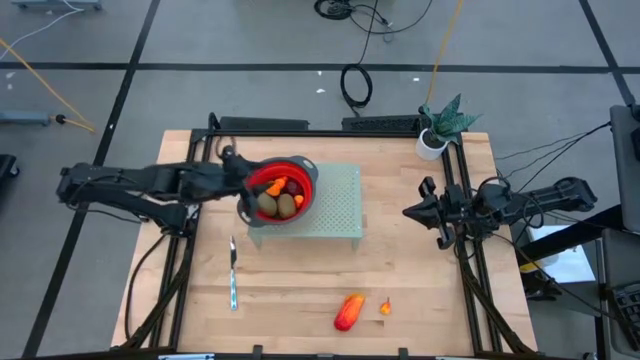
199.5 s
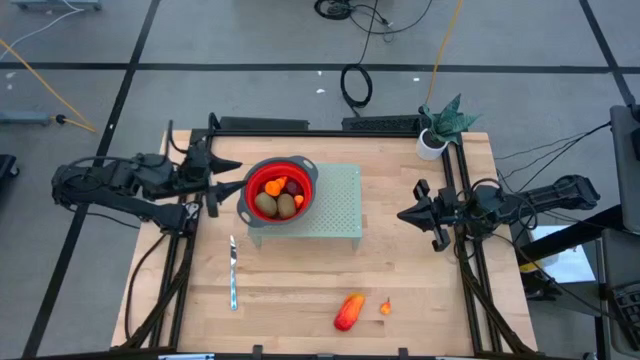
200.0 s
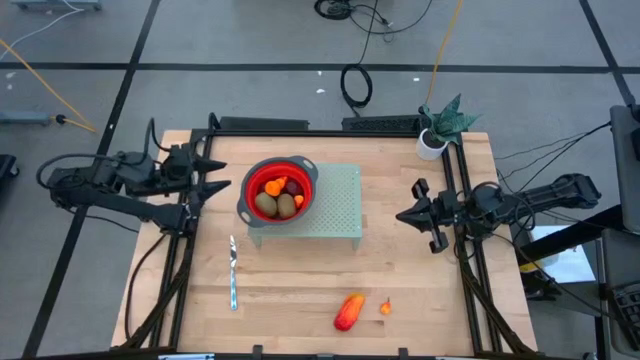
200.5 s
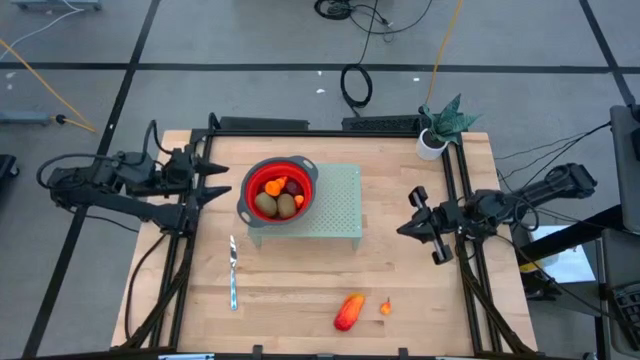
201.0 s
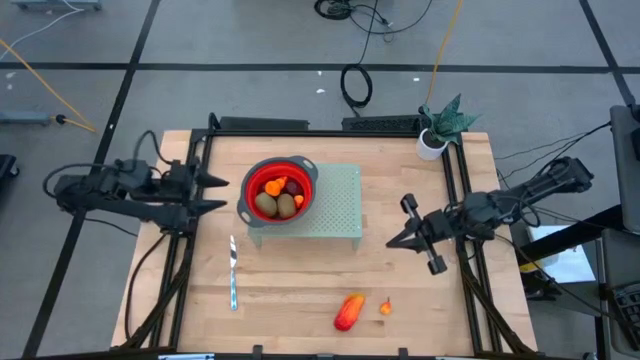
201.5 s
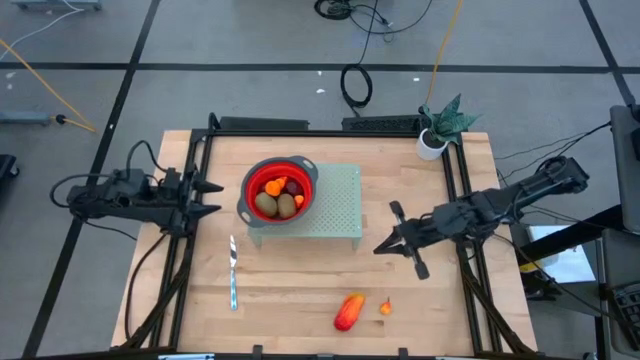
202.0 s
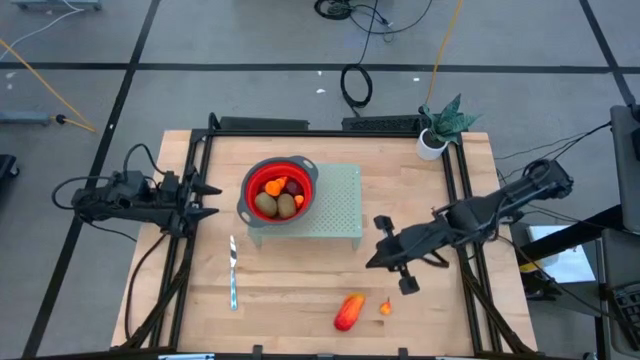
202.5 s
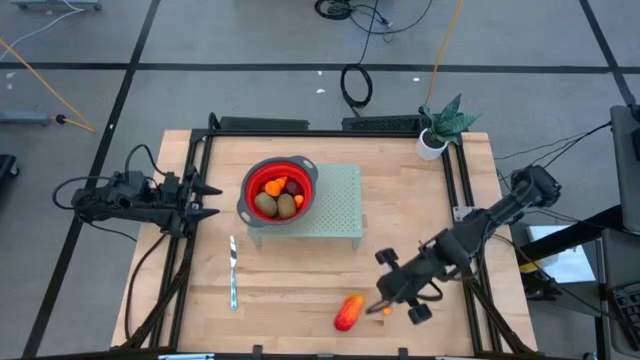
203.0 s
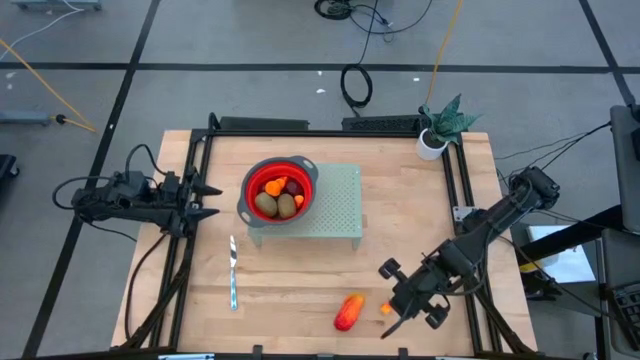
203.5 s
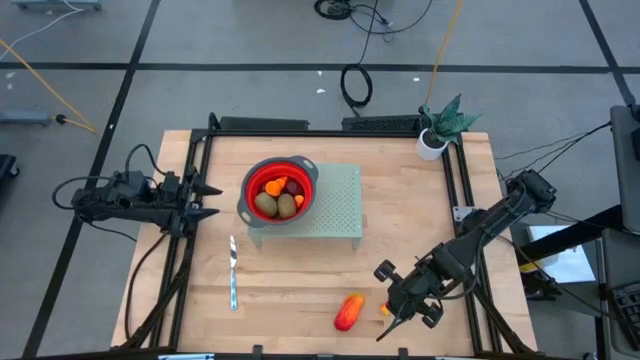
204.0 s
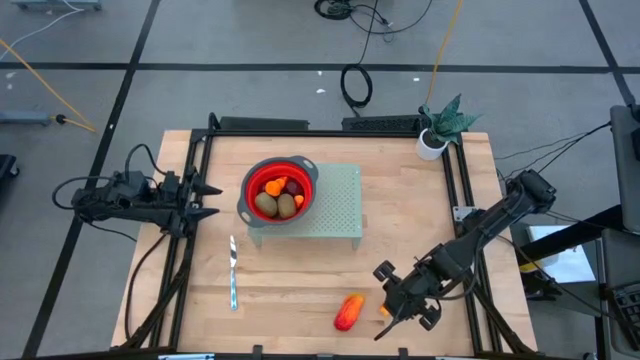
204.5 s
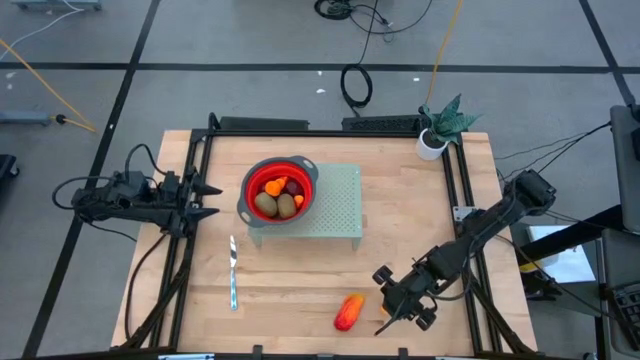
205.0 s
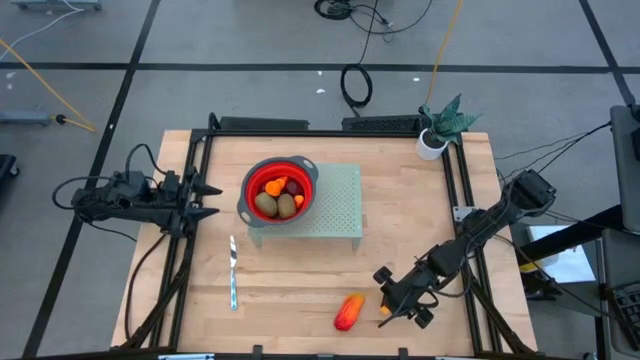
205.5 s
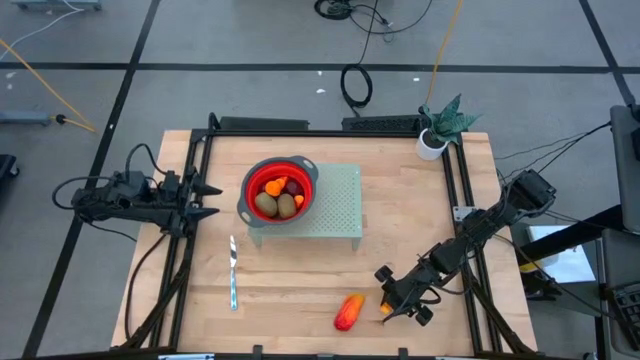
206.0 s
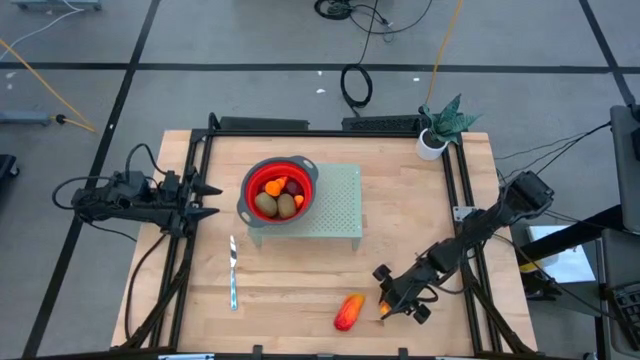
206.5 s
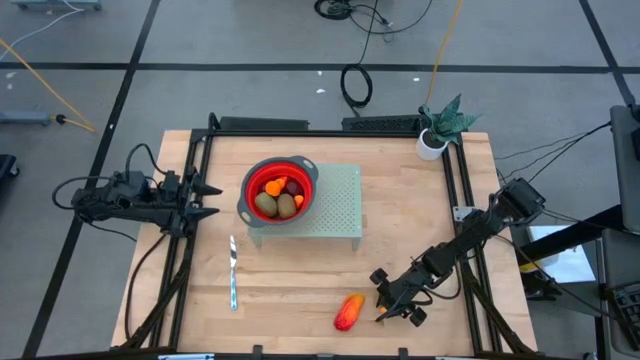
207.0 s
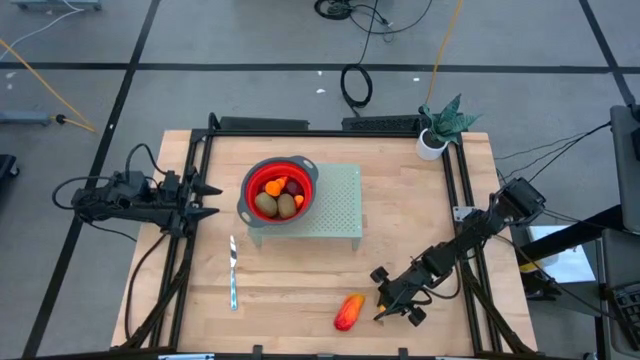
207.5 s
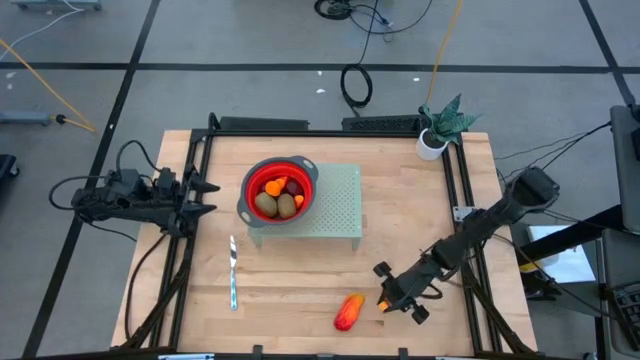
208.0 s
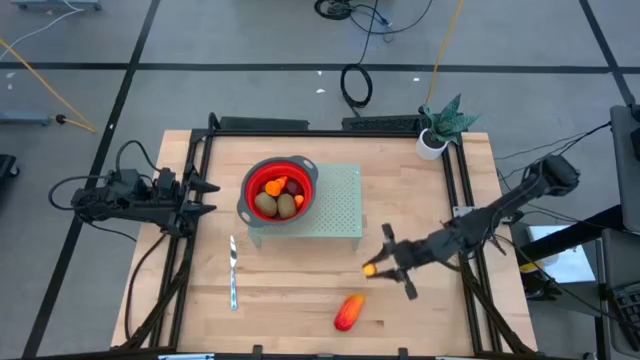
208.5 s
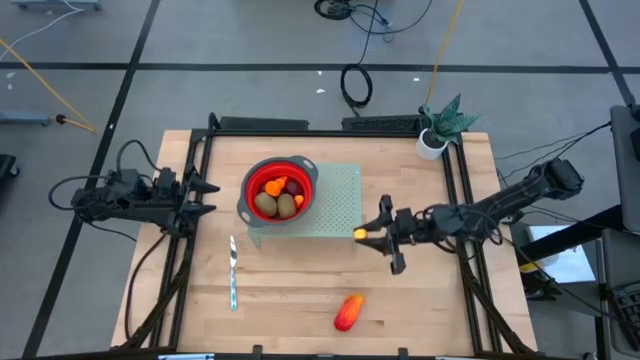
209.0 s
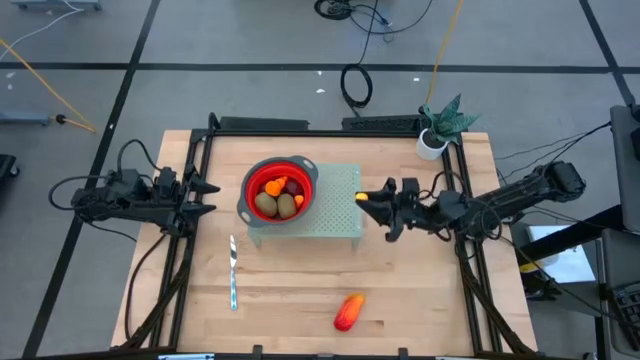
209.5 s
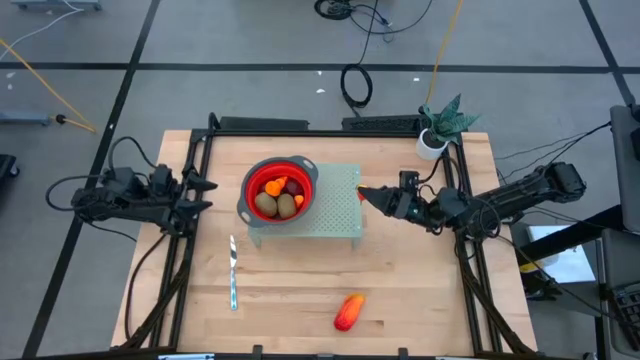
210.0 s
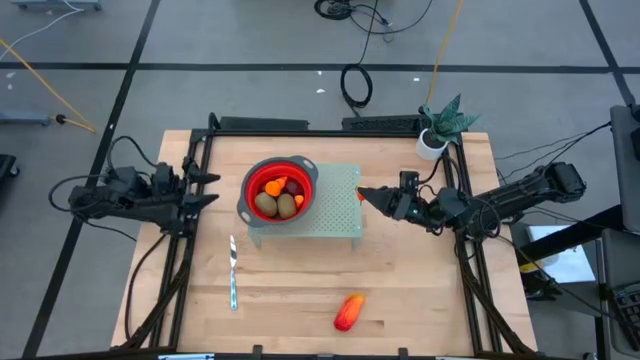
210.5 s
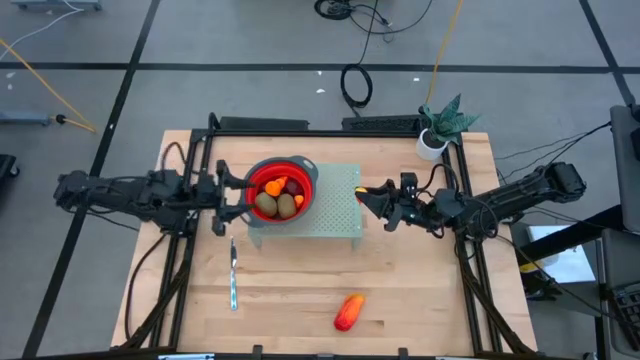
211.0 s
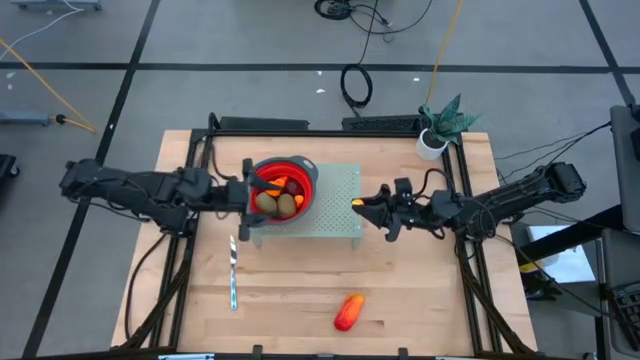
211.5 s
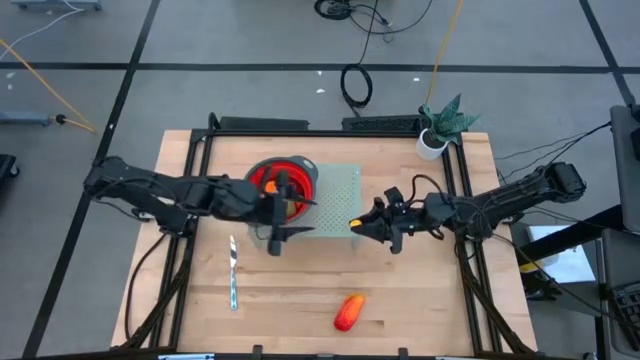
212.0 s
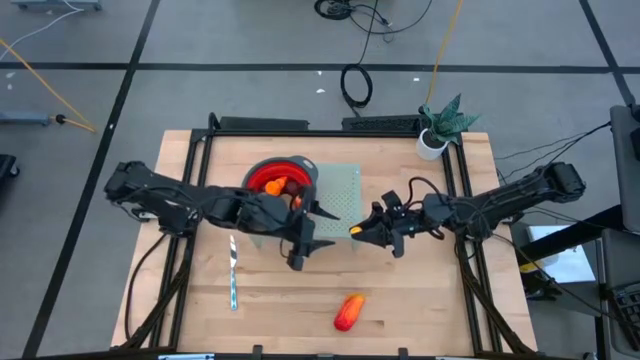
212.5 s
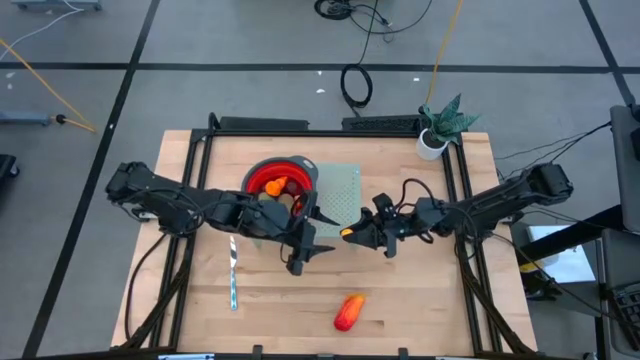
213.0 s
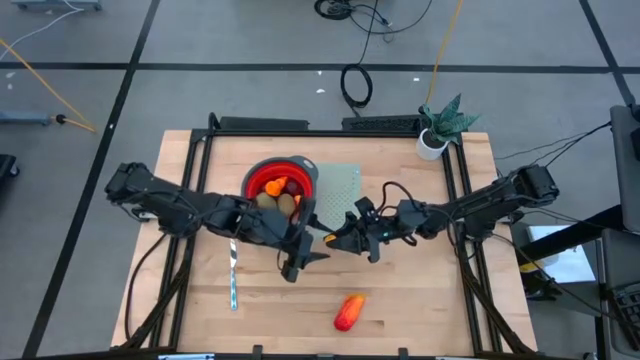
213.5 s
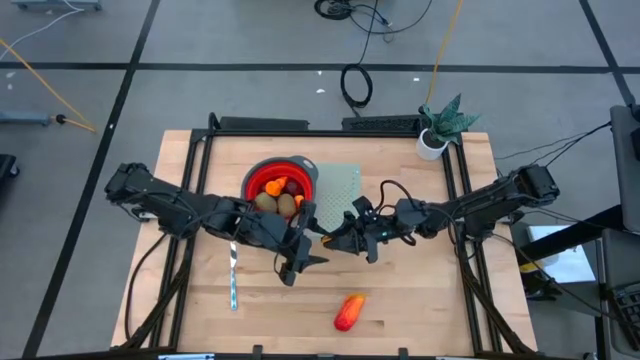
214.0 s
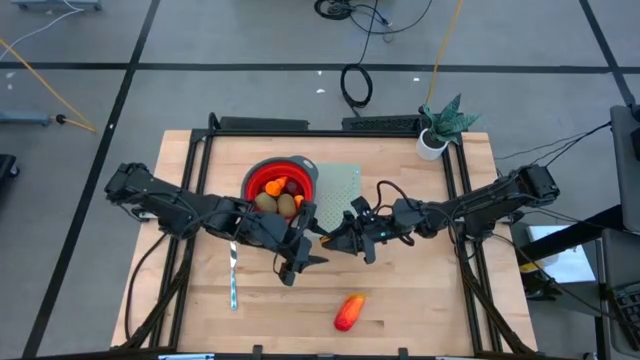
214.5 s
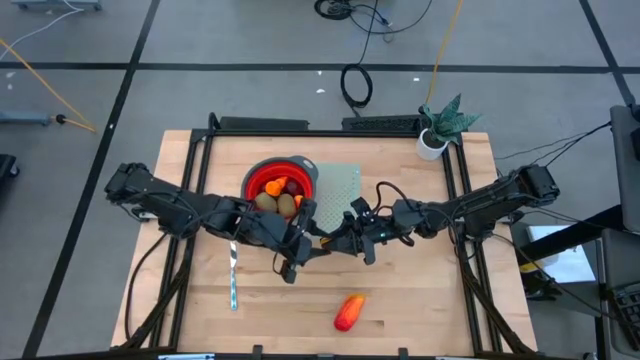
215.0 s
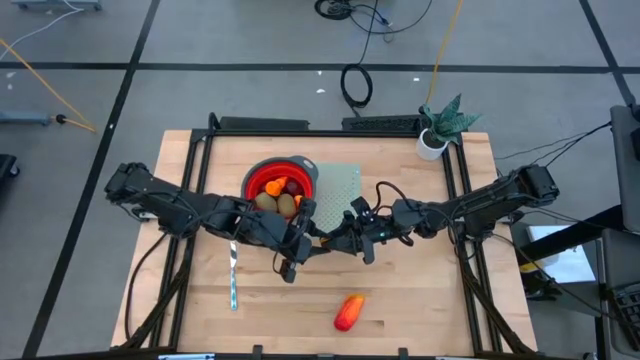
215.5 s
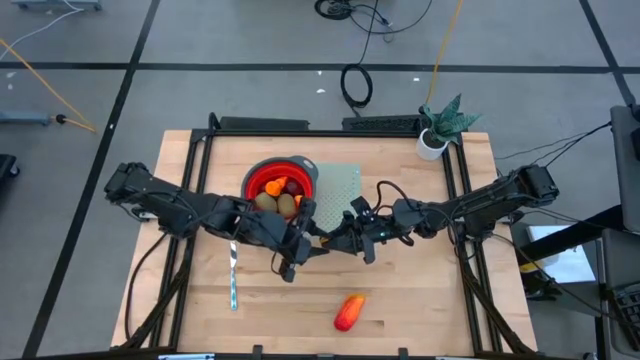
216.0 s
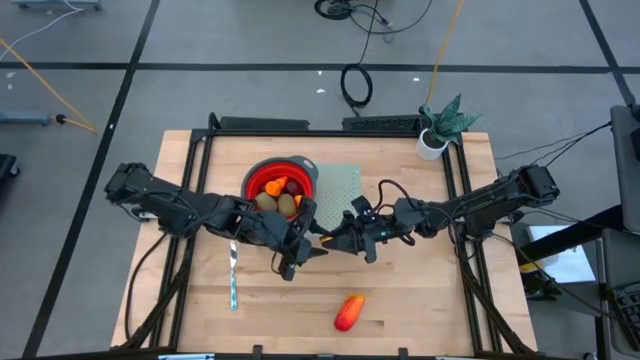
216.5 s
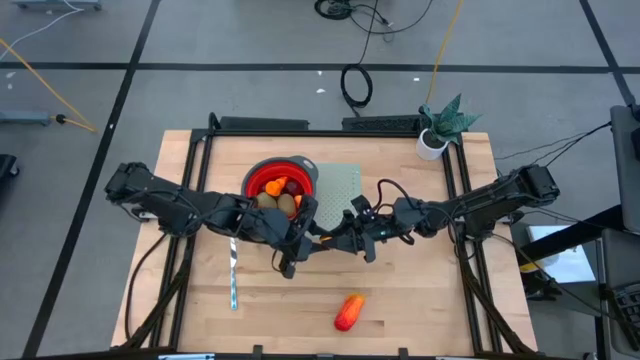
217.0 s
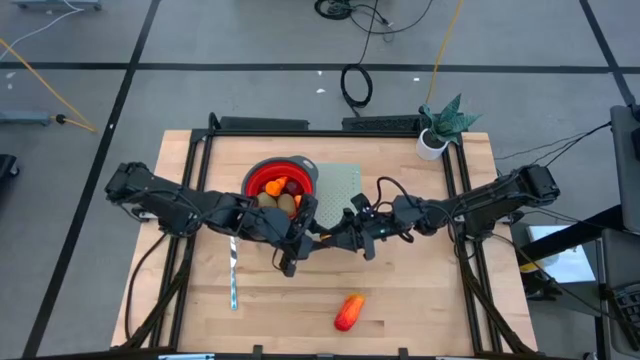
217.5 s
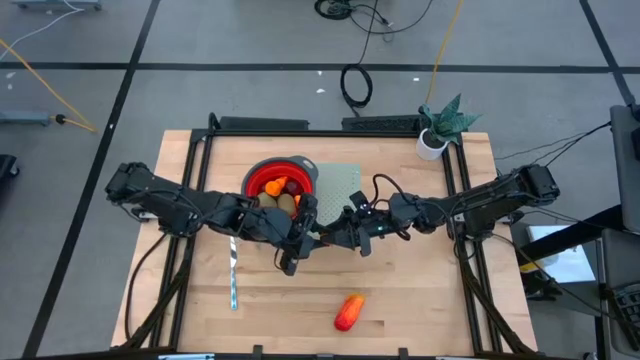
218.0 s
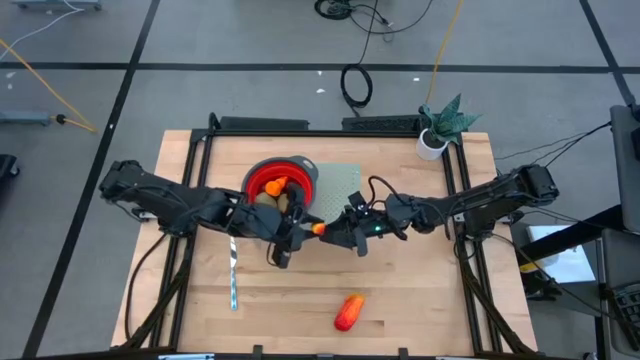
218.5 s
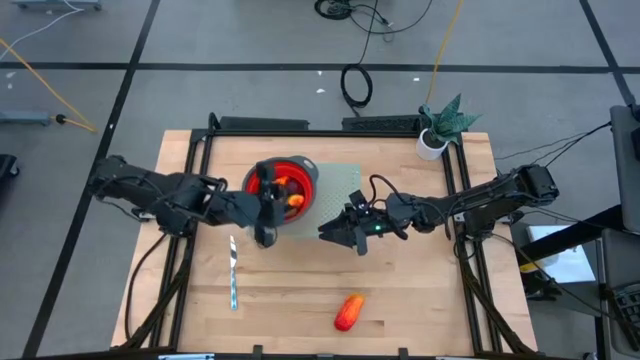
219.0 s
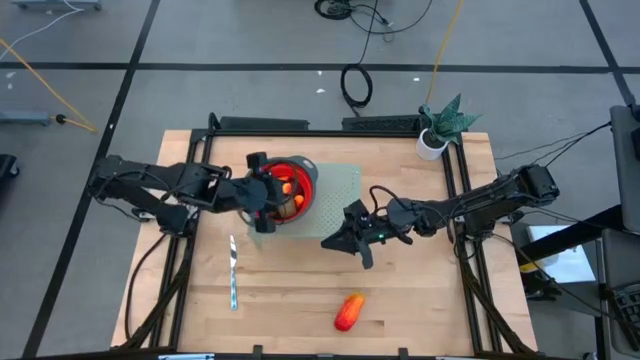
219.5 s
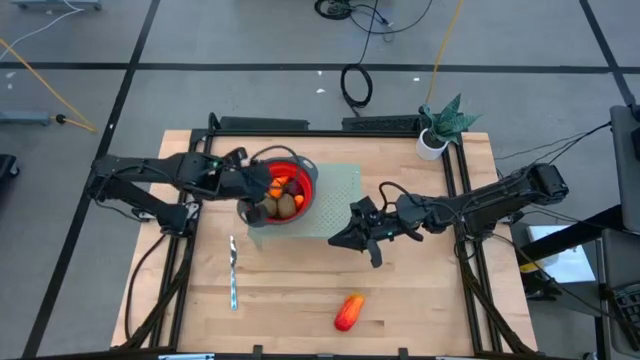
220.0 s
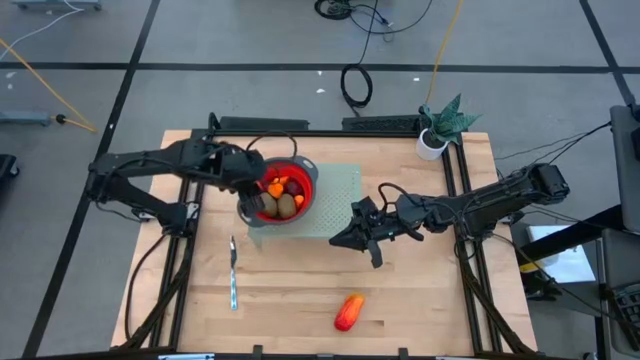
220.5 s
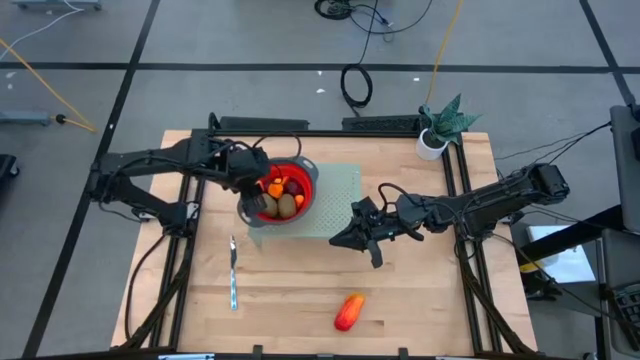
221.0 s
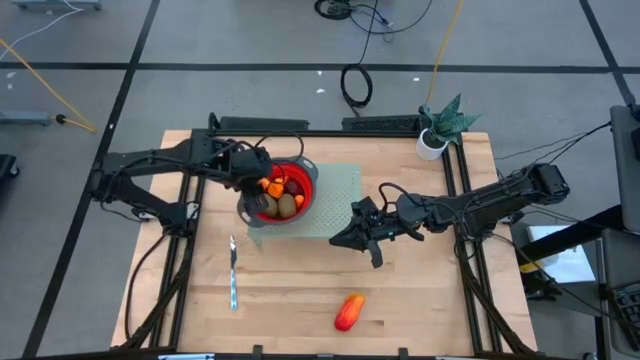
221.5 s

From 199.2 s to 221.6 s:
Task: Pick & Place Fruit
Put the peach into the strainer bowl on the shelf
